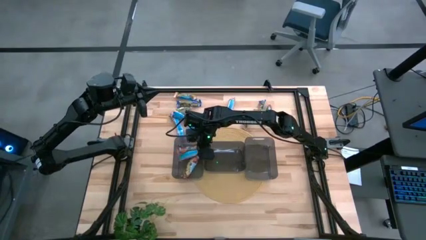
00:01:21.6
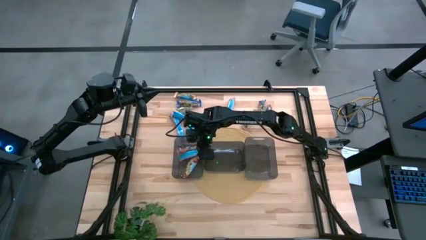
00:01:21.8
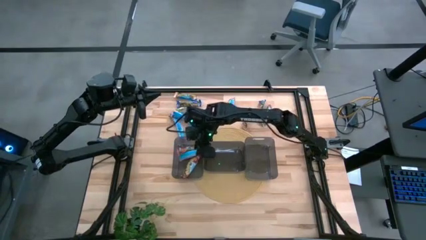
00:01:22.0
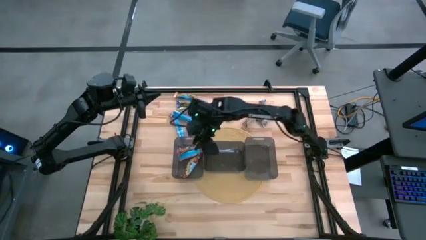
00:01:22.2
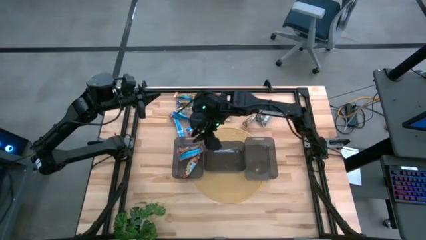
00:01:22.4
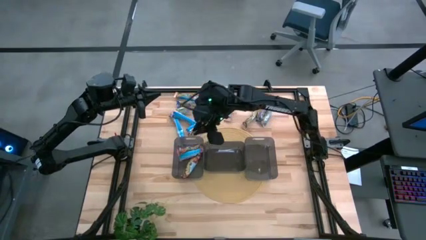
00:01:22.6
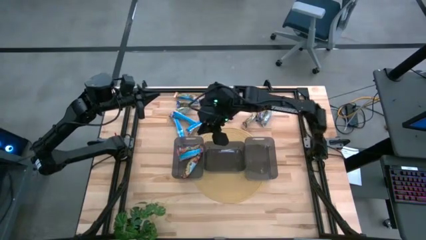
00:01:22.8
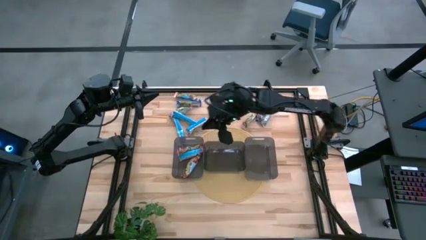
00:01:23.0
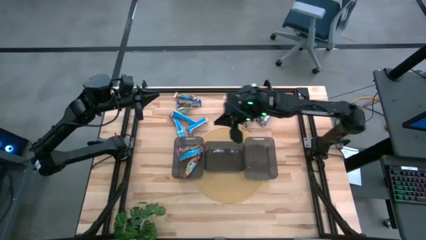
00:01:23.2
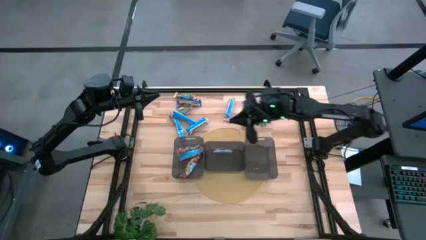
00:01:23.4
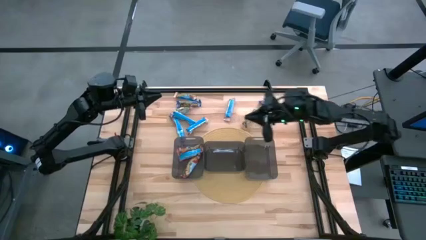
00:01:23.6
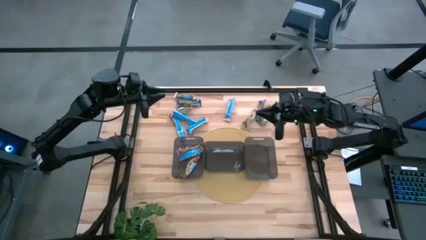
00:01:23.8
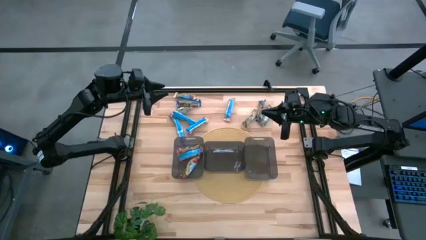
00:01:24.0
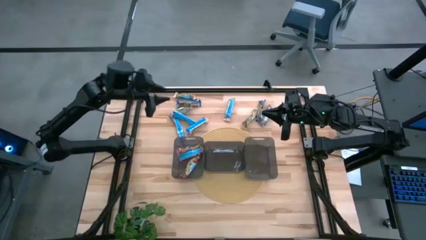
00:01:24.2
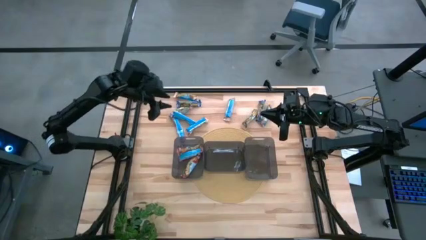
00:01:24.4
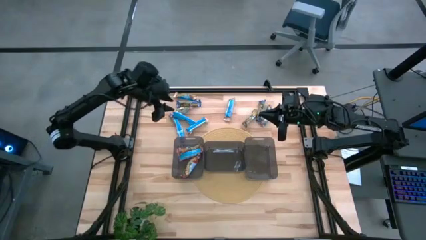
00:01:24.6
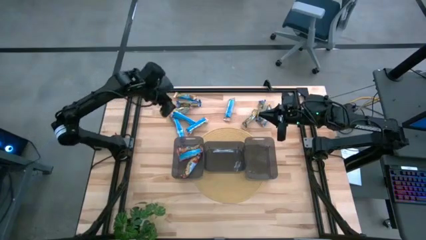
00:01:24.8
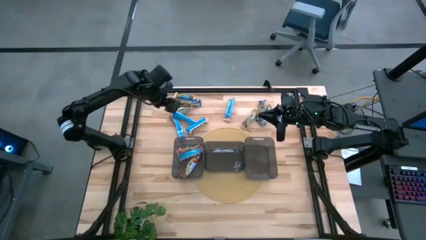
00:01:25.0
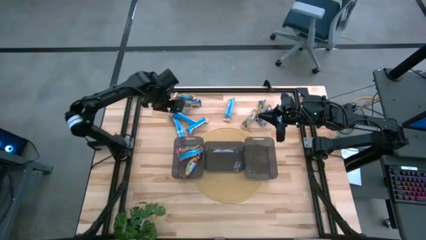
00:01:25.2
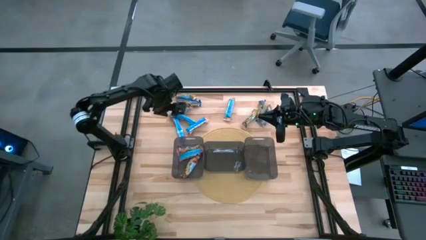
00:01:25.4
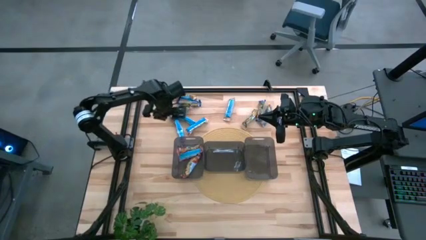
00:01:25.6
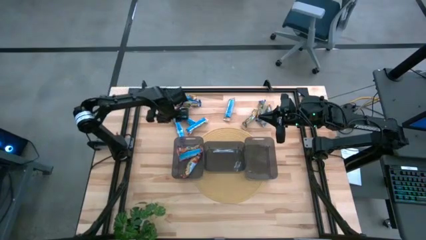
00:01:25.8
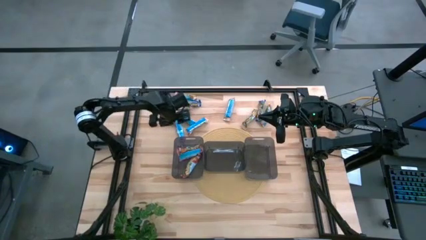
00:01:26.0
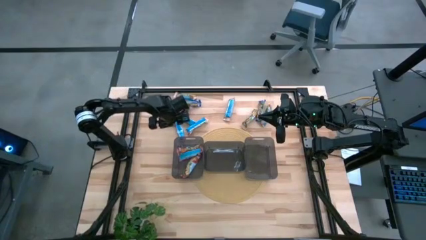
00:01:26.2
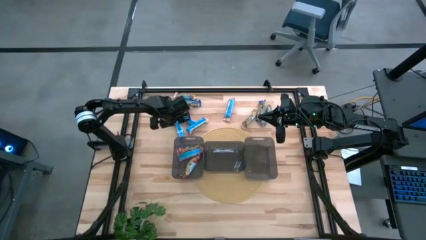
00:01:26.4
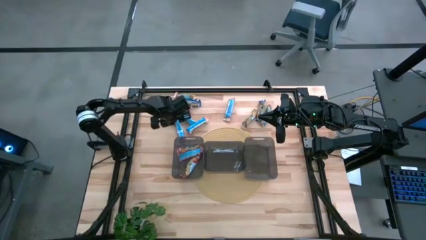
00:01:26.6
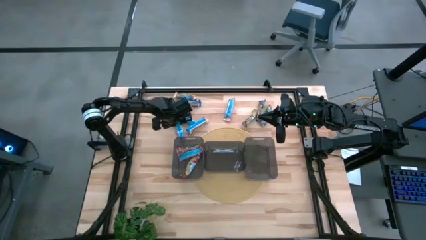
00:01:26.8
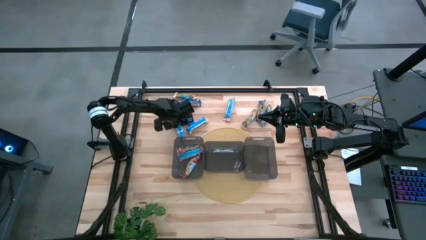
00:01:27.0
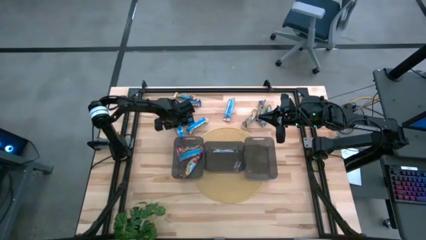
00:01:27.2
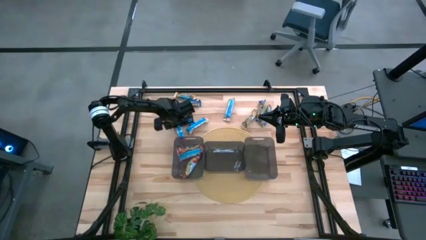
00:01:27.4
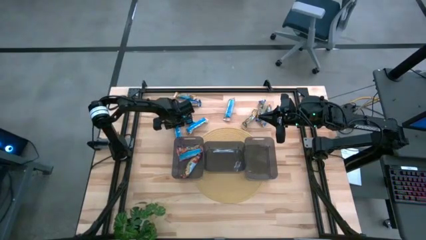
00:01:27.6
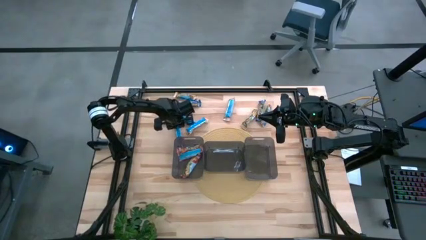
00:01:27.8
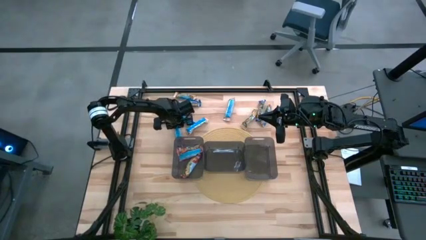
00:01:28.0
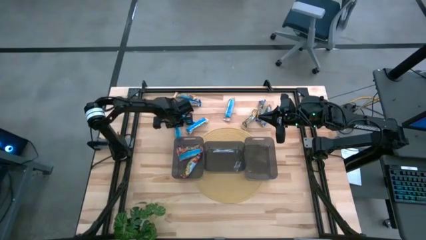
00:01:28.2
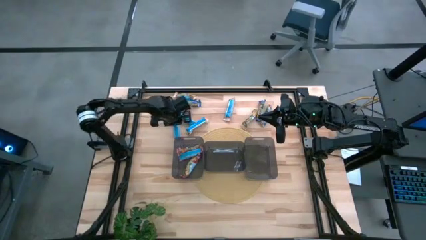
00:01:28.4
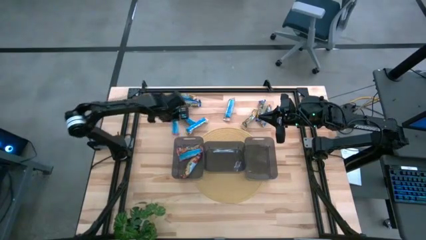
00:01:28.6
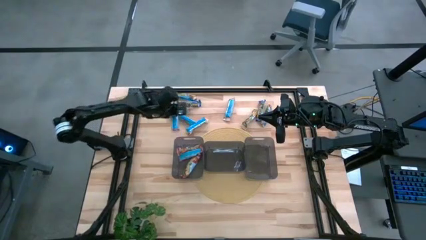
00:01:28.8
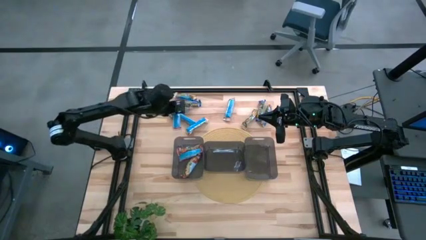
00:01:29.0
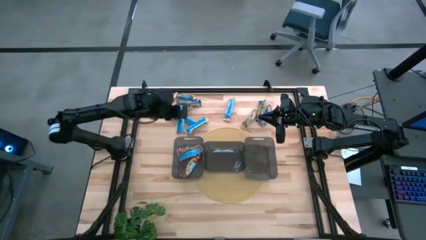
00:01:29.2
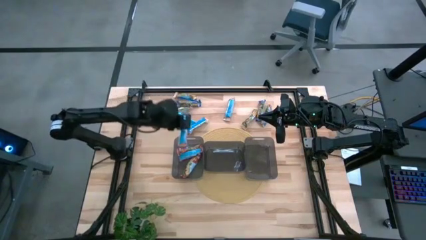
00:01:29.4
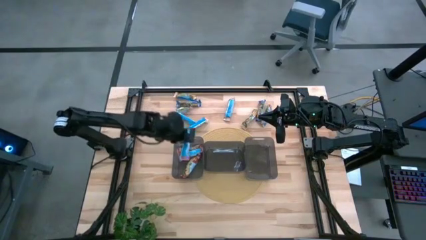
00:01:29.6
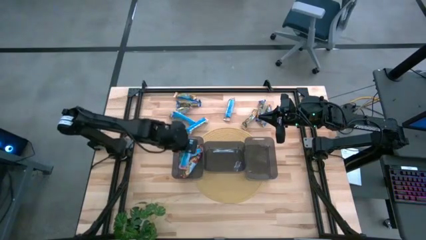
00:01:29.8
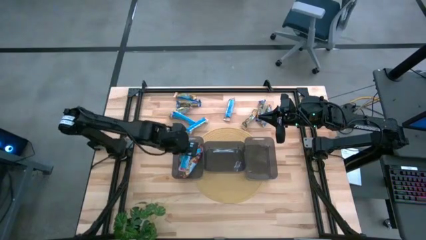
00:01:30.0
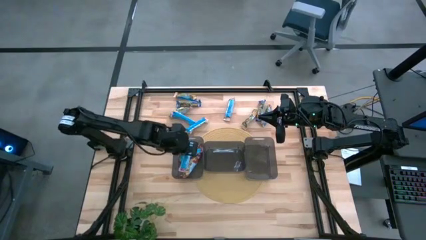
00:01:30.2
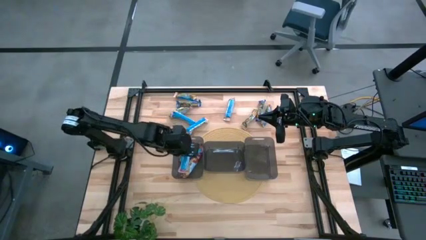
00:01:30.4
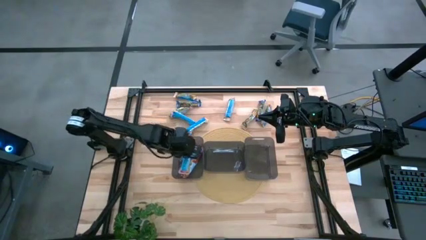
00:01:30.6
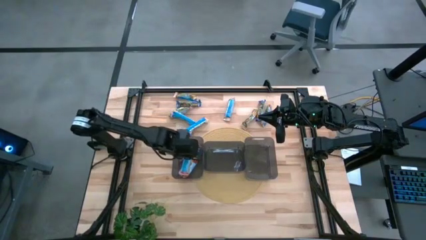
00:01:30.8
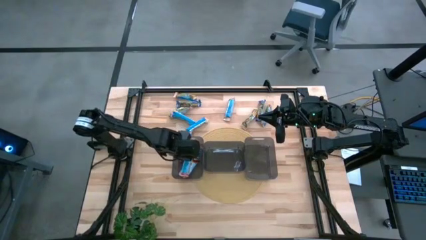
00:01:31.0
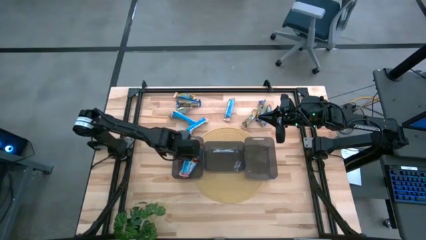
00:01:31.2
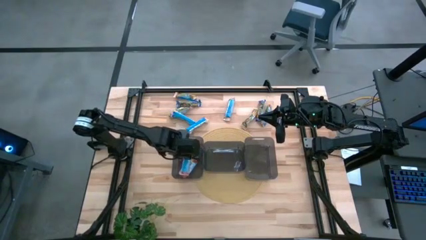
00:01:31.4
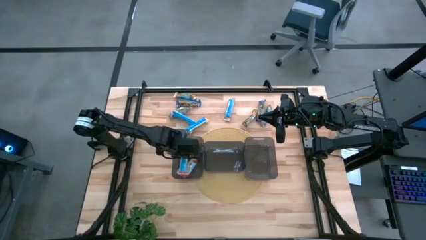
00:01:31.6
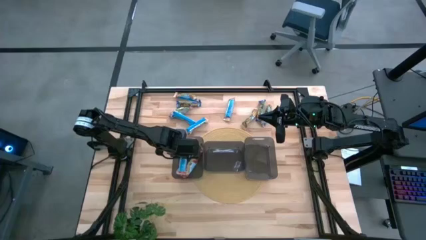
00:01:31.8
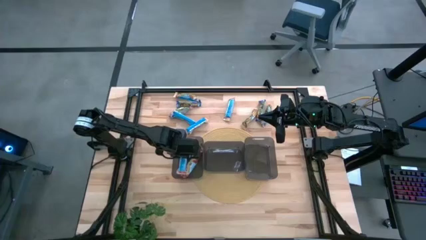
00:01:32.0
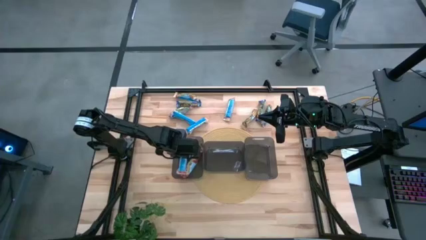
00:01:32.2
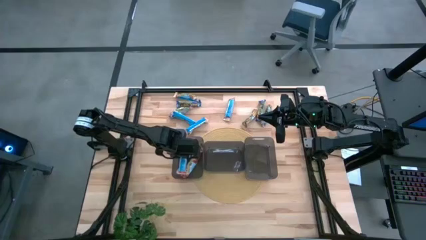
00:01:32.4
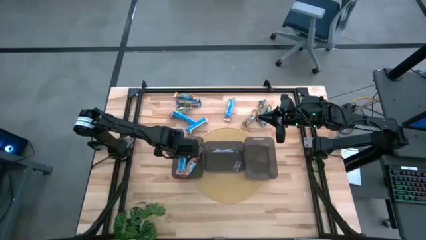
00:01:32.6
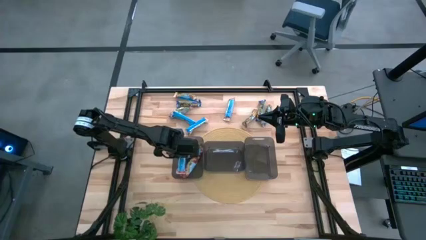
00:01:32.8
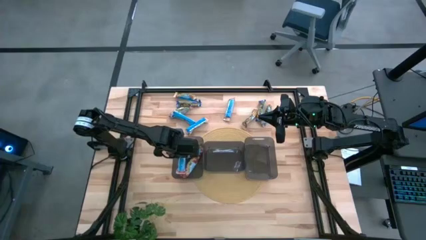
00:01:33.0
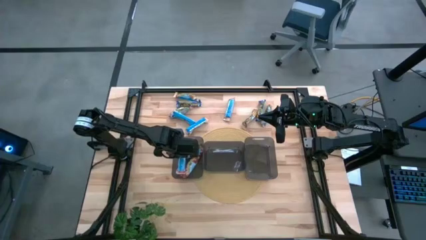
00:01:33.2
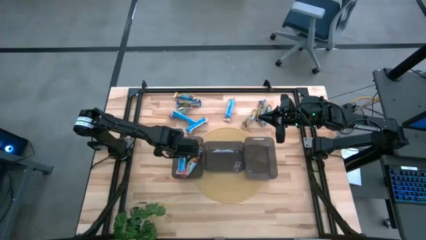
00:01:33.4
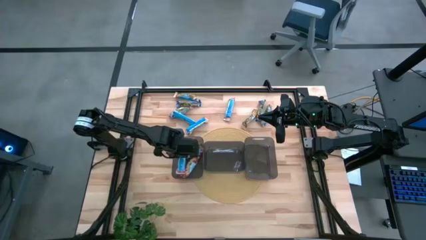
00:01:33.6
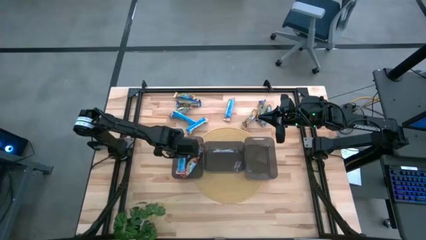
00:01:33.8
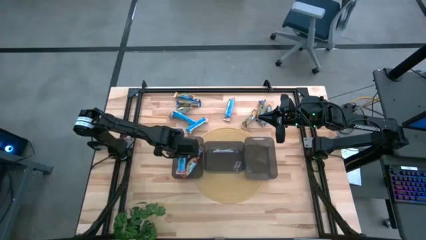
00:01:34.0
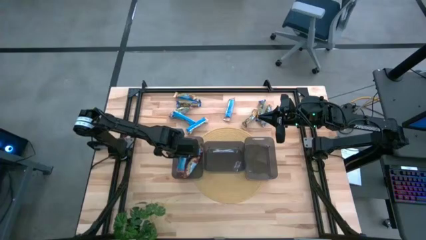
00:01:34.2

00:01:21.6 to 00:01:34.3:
Task: Pick and place Granola Bars by type
Put the red granola bar into the left black bin

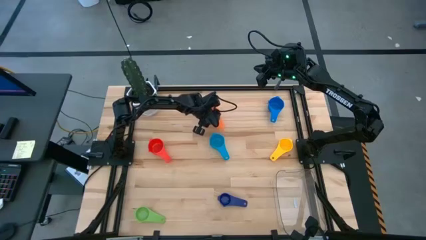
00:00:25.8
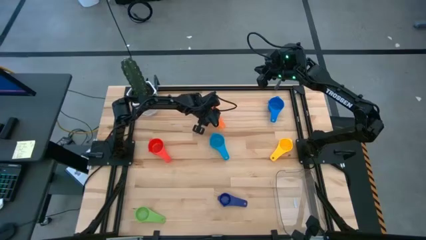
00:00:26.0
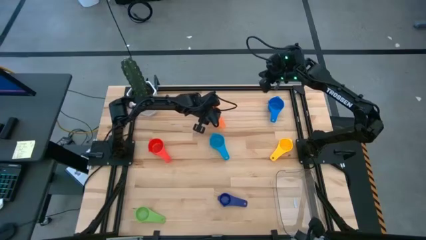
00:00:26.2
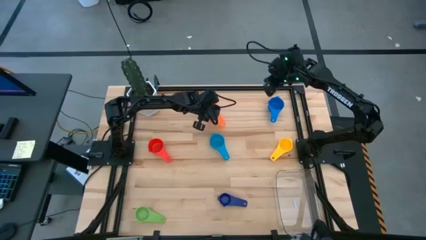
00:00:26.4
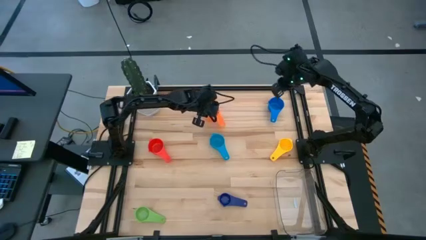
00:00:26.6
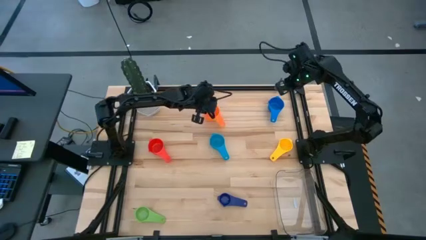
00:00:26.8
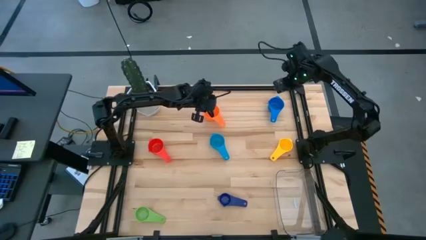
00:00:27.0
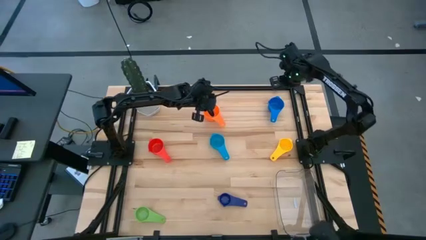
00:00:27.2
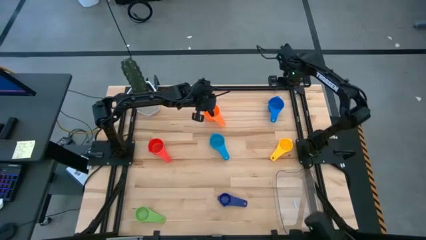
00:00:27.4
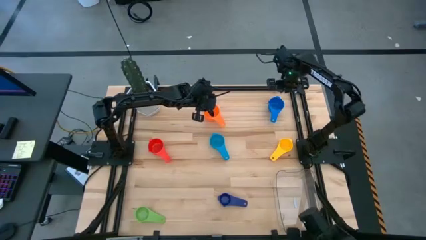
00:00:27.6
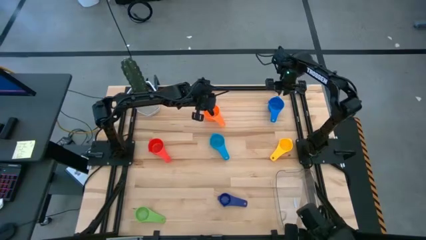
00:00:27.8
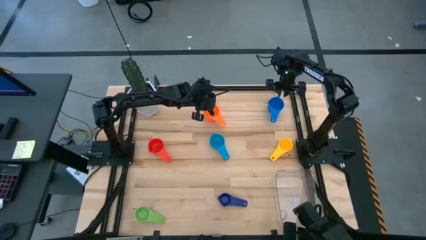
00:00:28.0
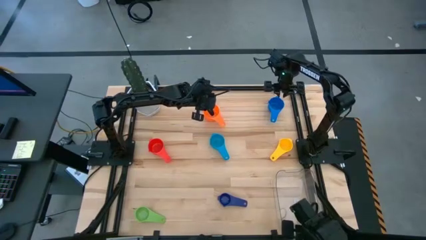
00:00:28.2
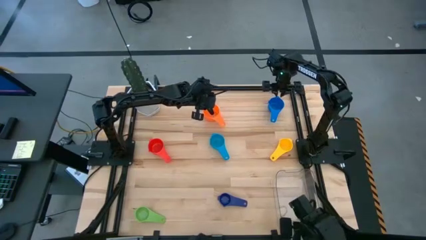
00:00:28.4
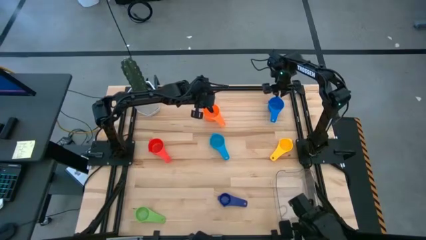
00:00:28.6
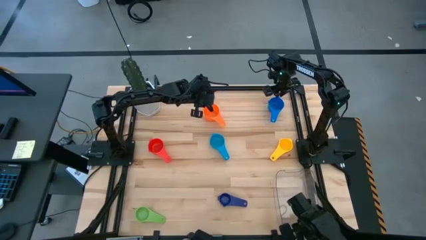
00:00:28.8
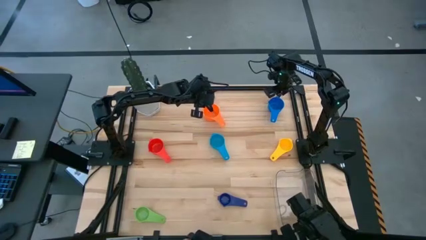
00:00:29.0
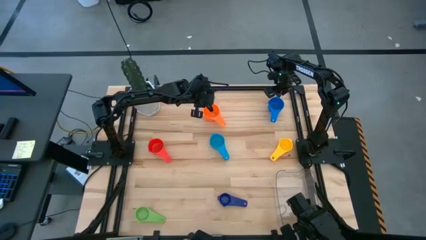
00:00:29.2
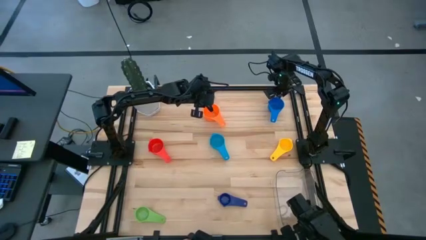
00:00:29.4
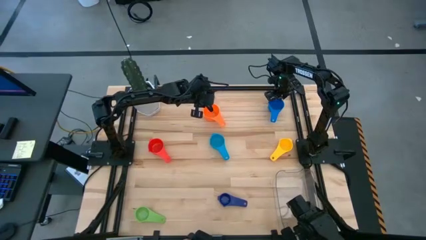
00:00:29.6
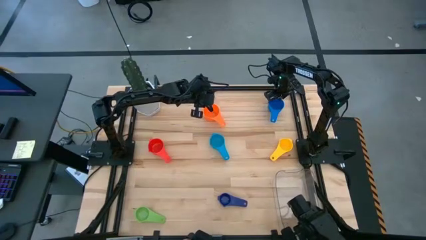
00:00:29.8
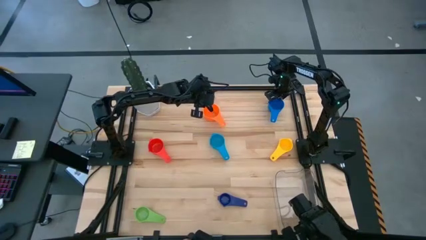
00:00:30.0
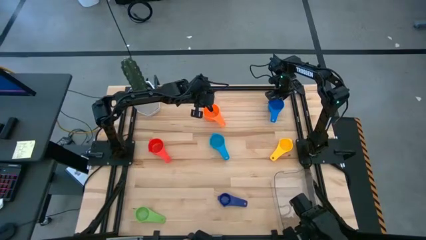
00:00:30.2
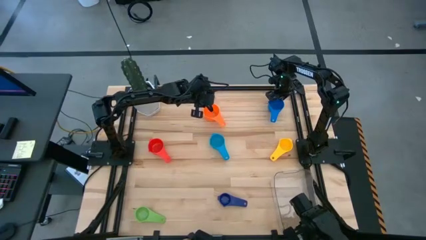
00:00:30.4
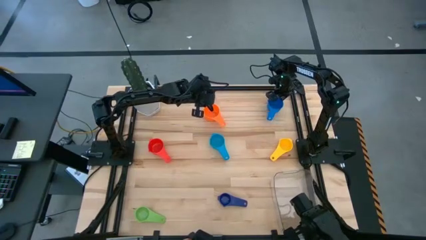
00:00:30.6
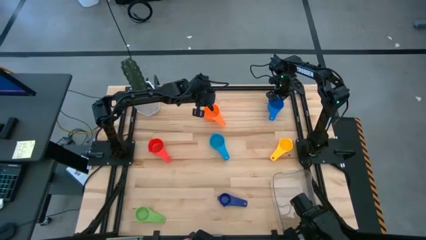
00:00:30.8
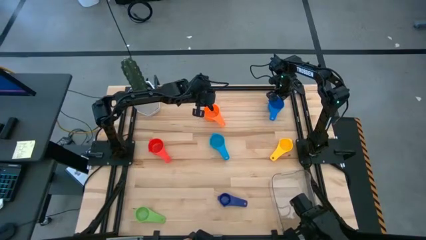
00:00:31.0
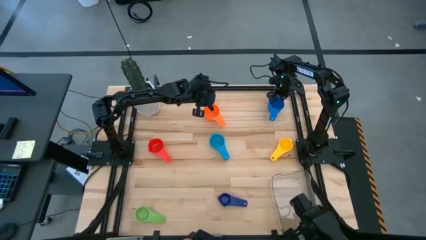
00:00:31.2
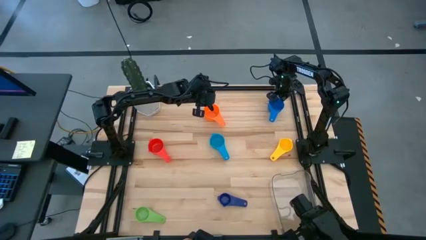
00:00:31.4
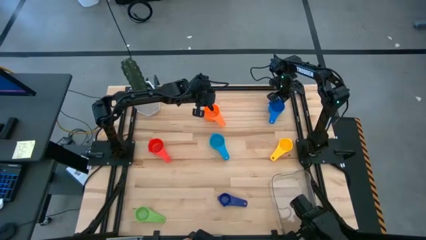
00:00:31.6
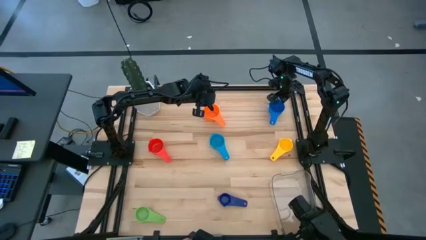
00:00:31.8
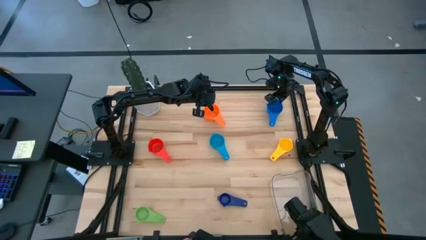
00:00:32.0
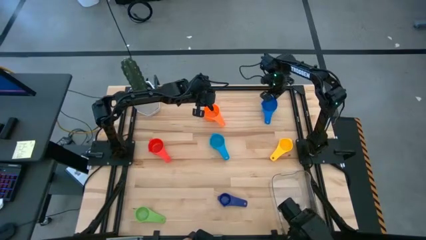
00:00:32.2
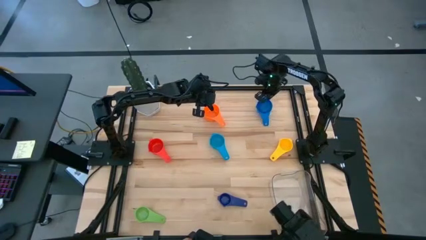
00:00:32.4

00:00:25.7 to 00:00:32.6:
Task: Nest measuring cups in basket
Stack the blue measuring cup on top of the orange measuring cup
